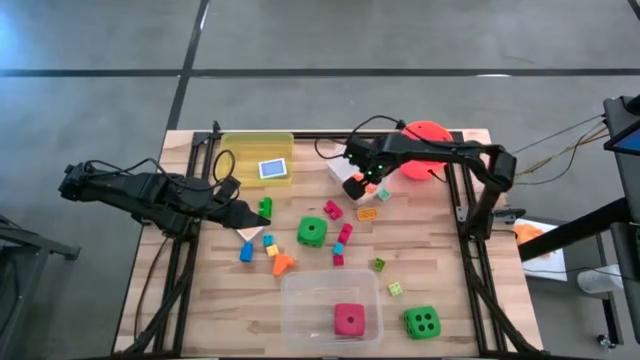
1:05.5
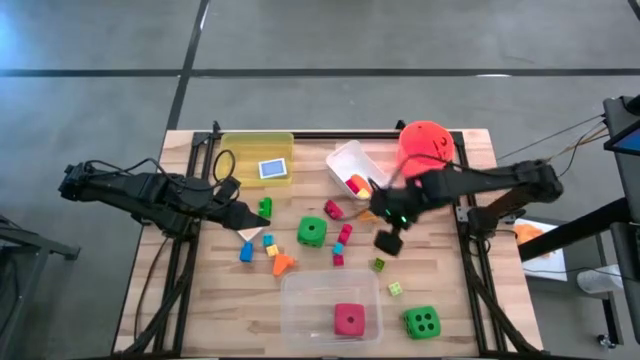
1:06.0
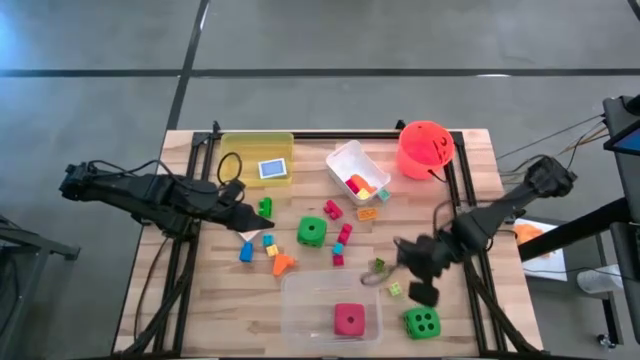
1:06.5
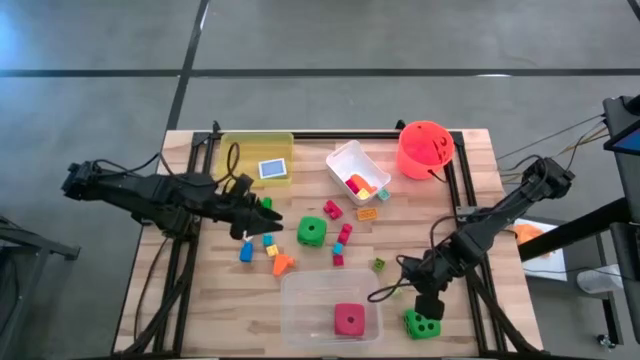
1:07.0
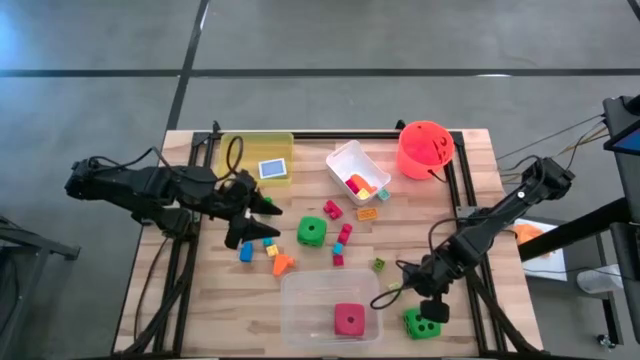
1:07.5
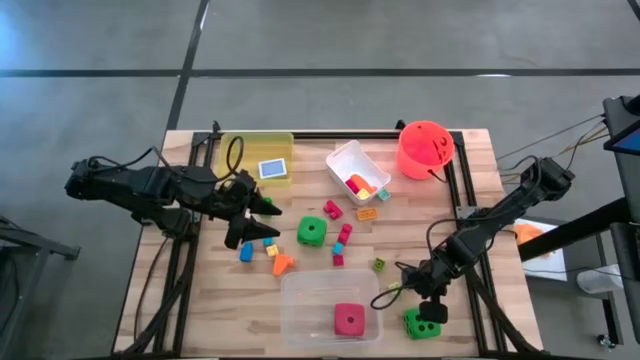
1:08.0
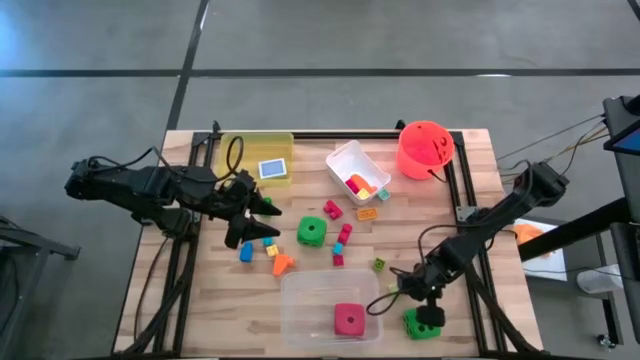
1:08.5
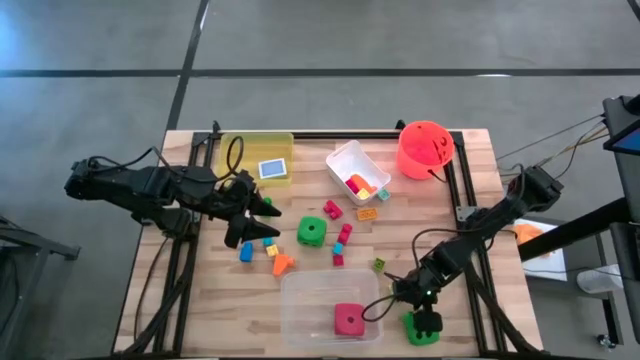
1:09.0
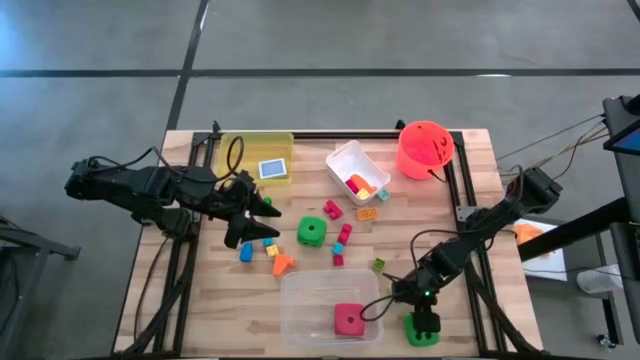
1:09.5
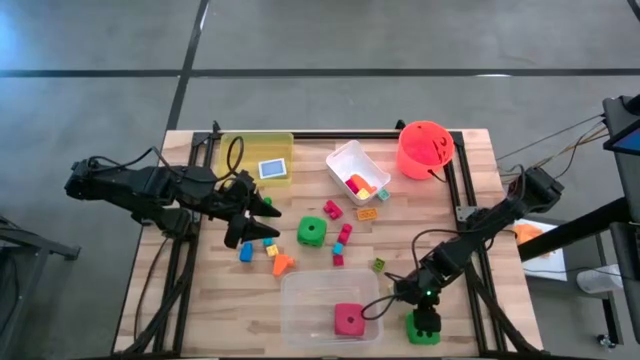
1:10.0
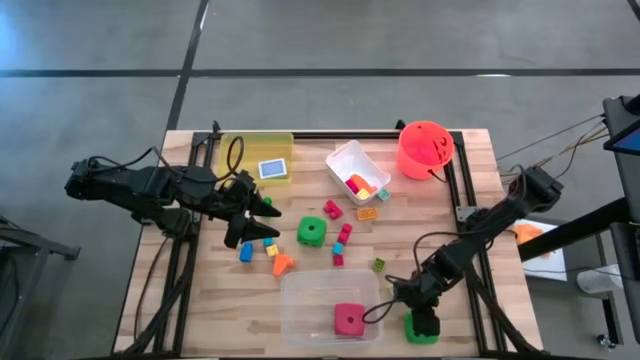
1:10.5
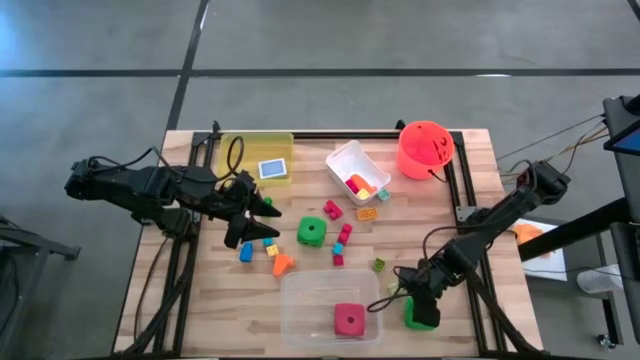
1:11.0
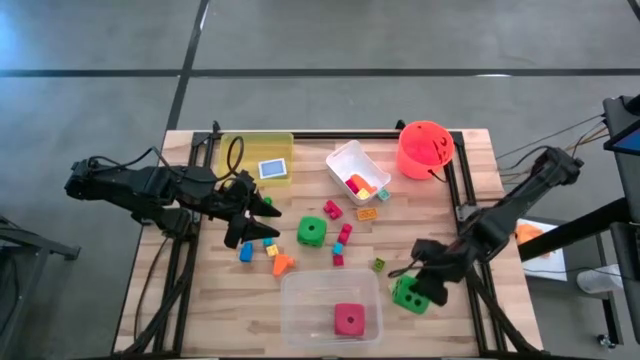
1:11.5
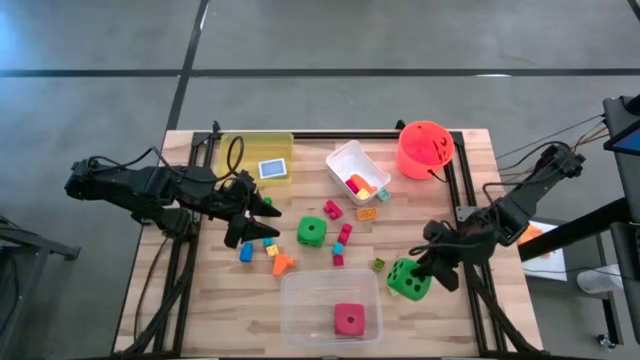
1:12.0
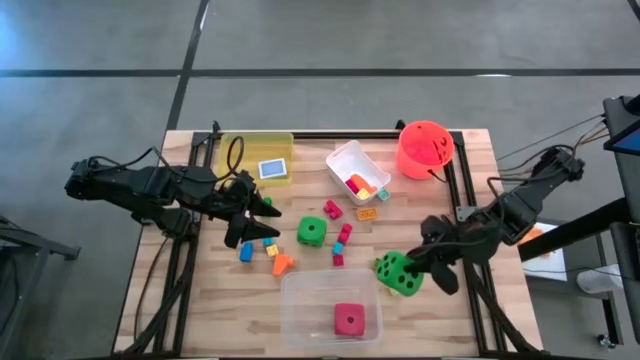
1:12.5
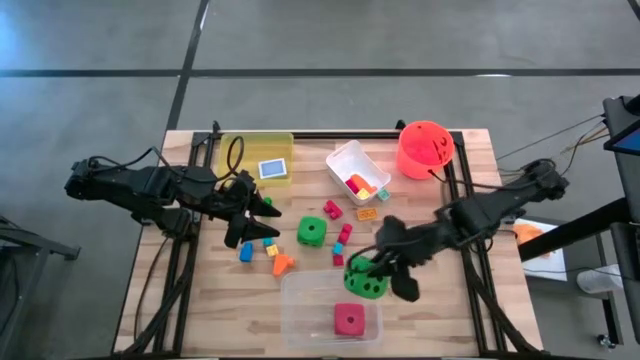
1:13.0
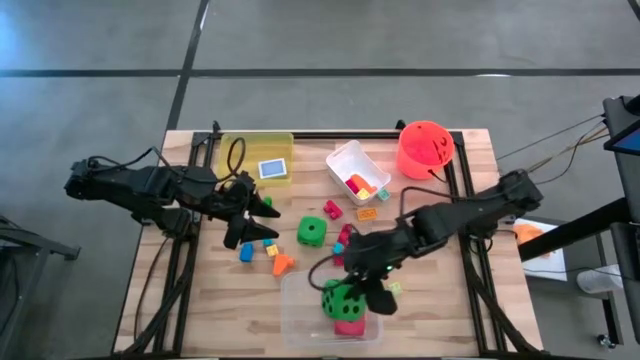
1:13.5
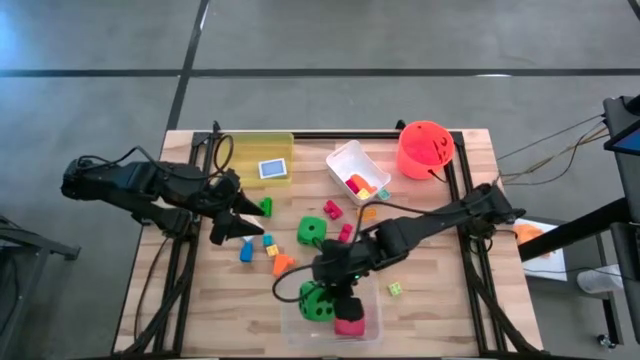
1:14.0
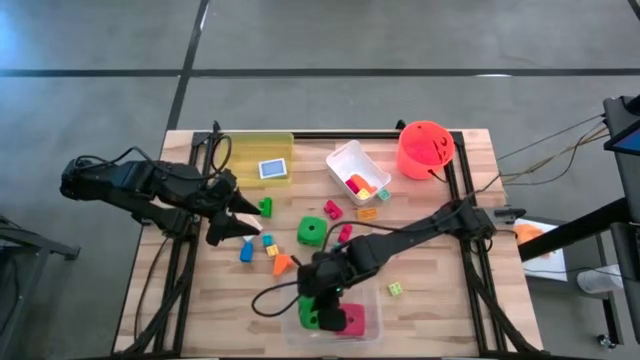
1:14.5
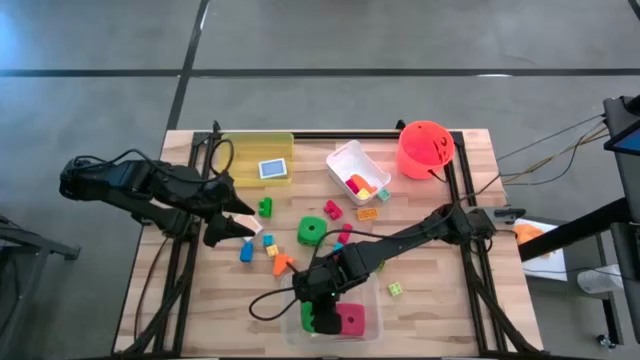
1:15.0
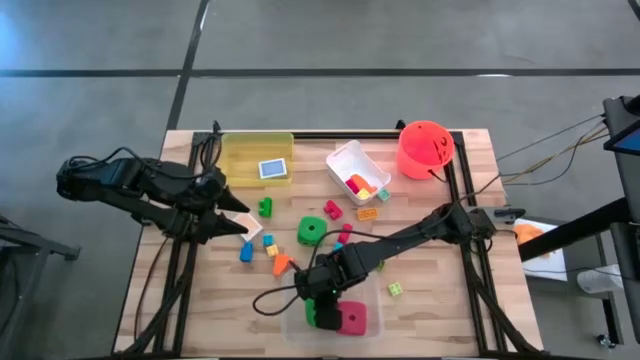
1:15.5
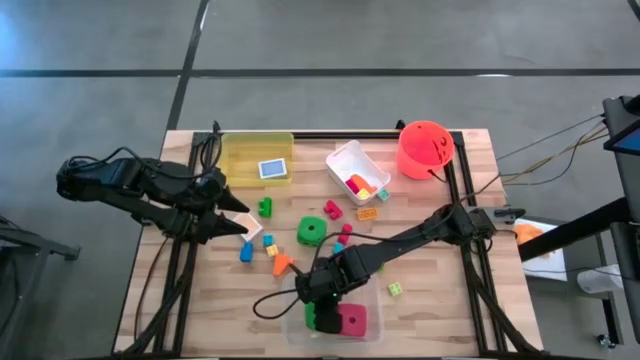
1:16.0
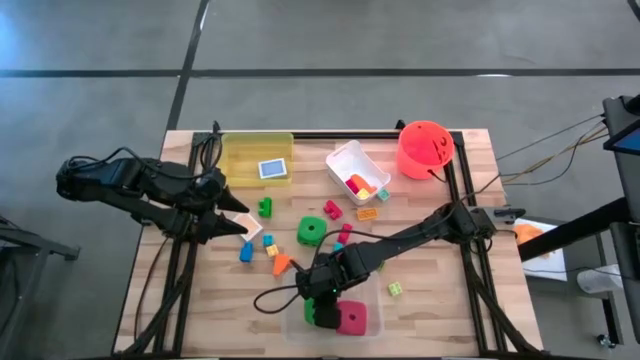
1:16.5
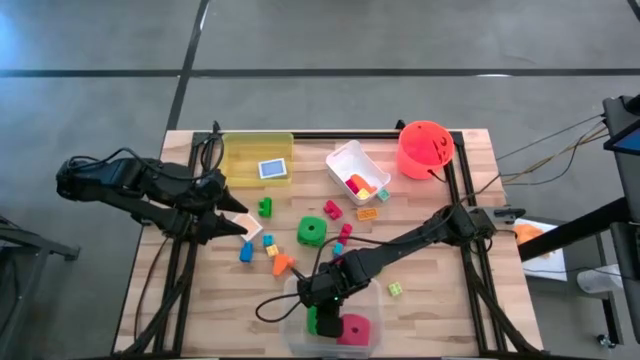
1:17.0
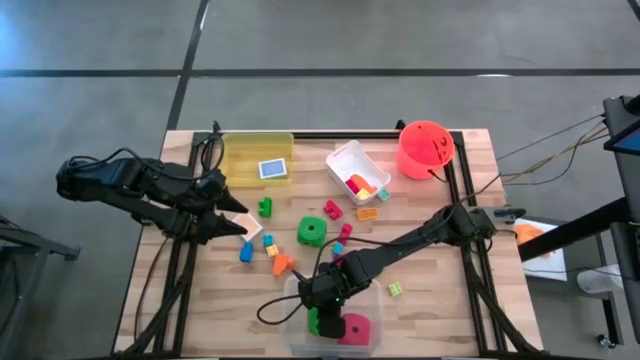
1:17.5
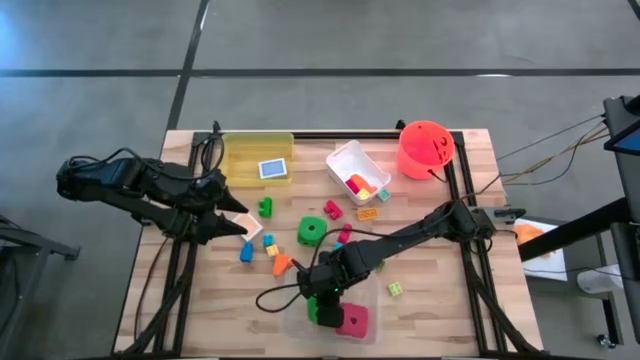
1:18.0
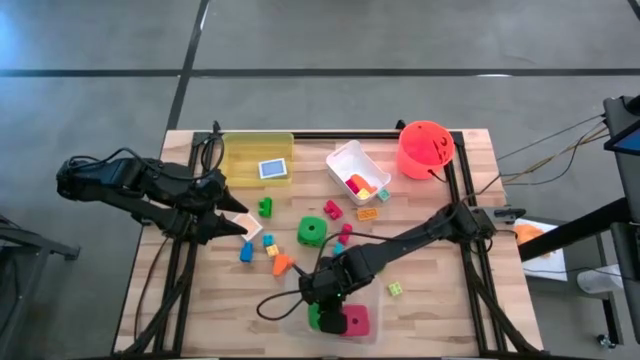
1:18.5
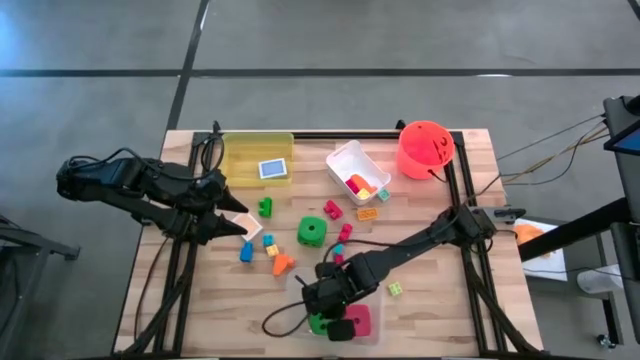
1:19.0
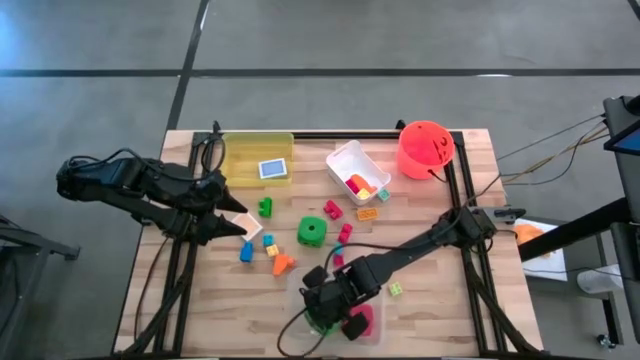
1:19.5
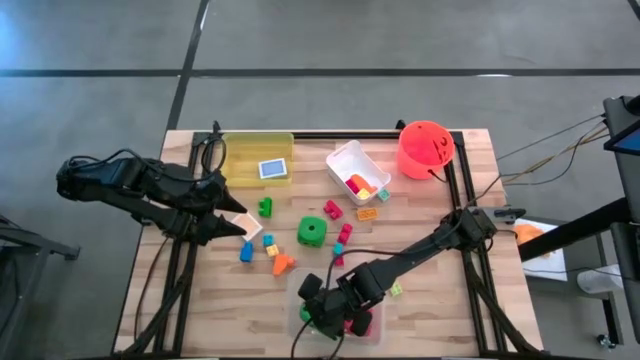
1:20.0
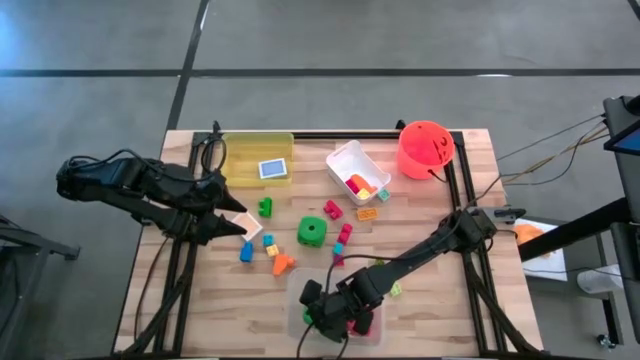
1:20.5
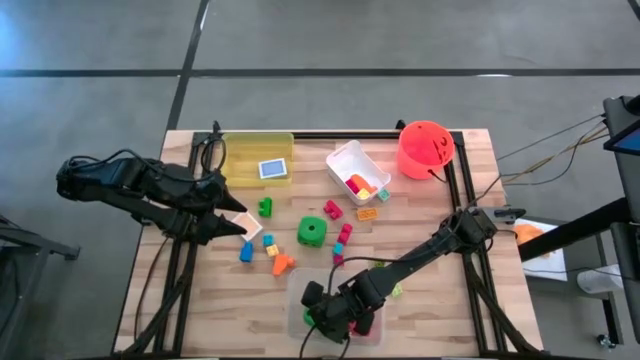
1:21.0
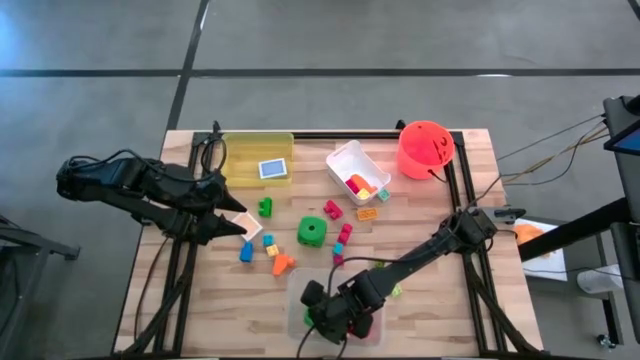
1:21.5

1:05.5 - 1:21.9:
Task: Pick & Place Toys
Put the green dice into the transparent bin

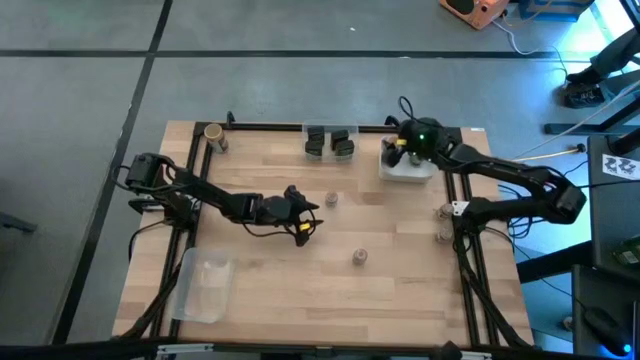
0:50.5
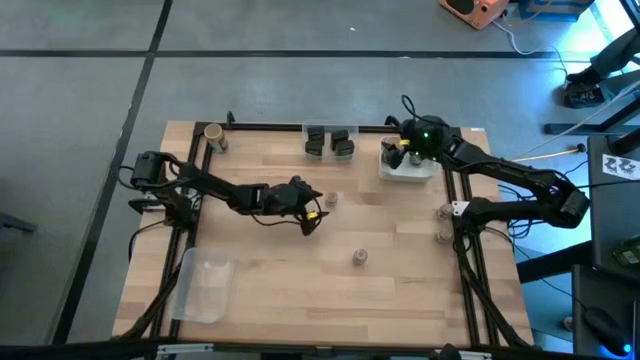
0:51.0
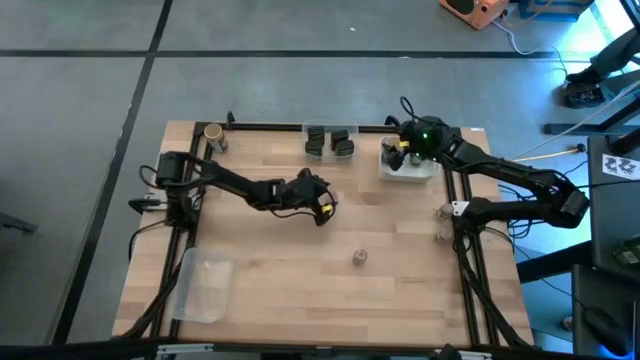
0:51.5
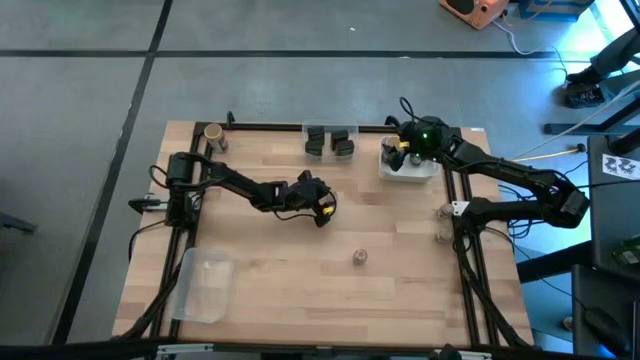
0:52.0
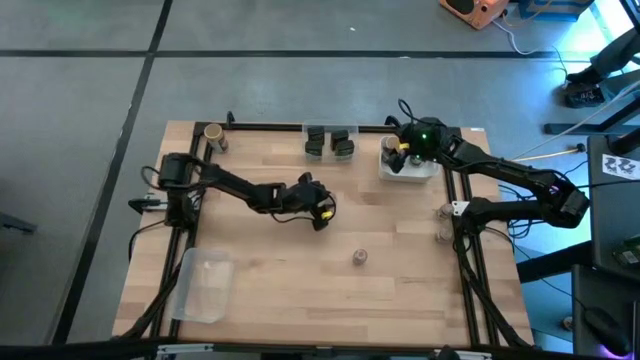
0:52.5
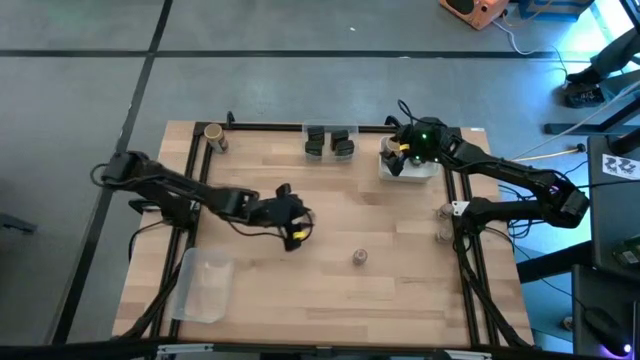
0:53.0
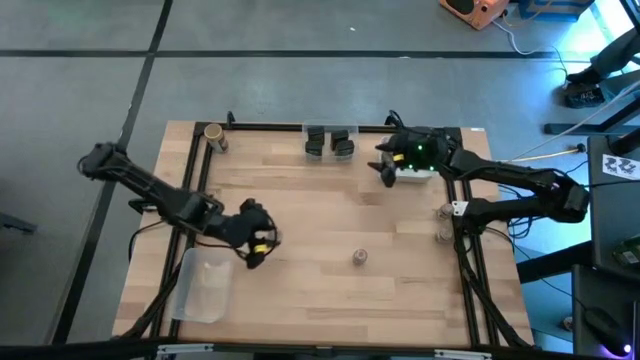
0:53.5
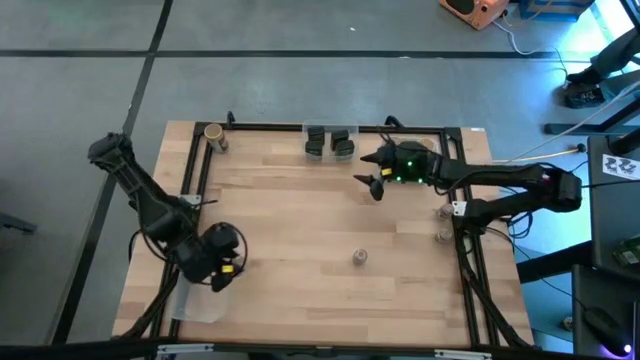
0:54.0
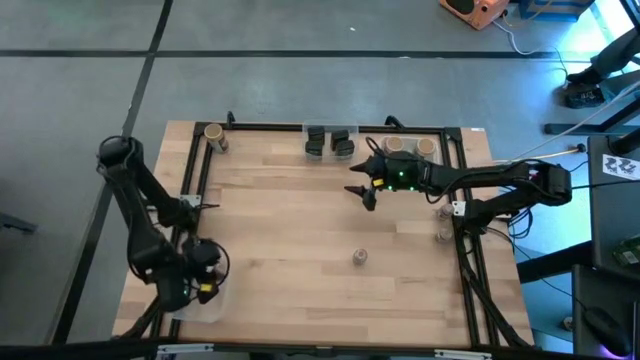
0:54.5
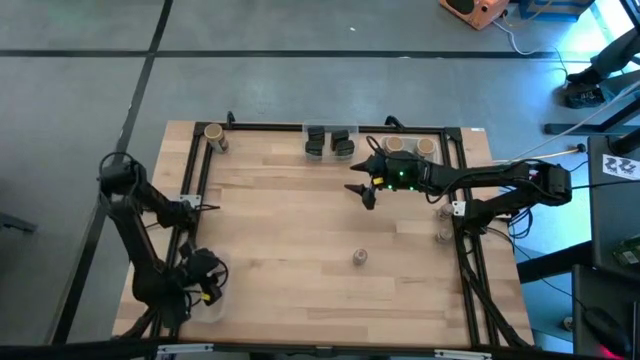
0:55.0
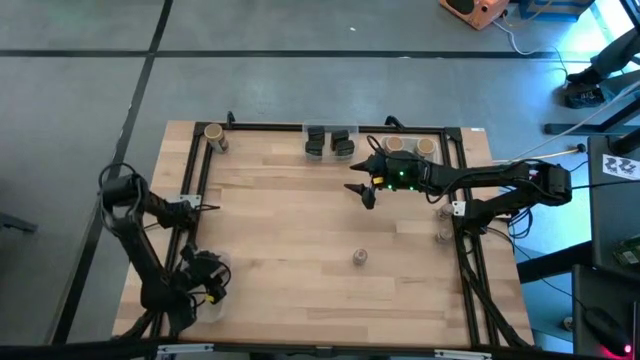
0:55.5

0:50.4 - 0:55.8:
Task: Sort spices by type
Put the top left transparent seasoning bottle into the left transparent bin
